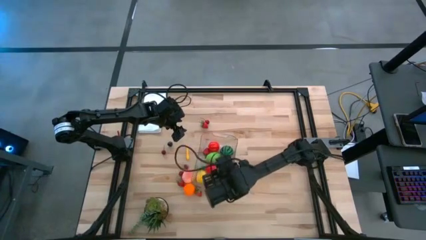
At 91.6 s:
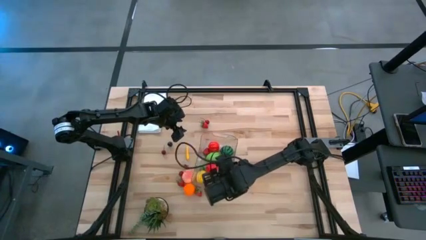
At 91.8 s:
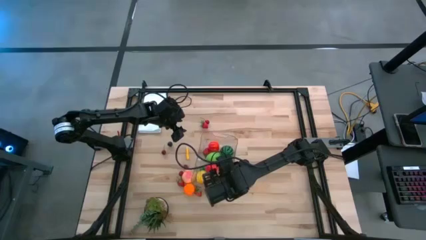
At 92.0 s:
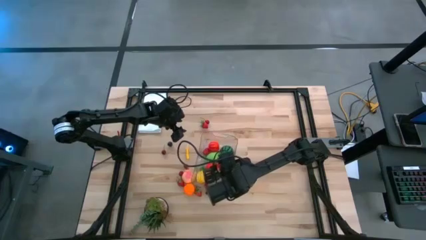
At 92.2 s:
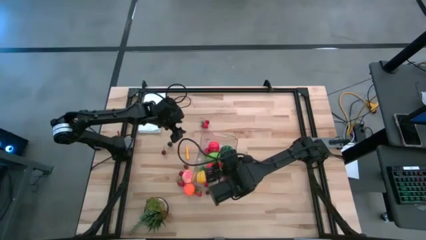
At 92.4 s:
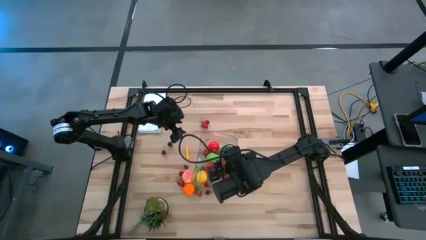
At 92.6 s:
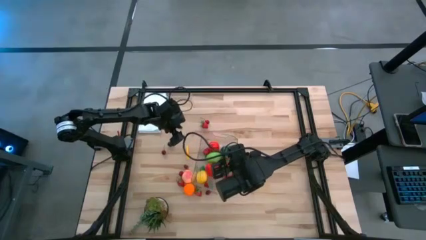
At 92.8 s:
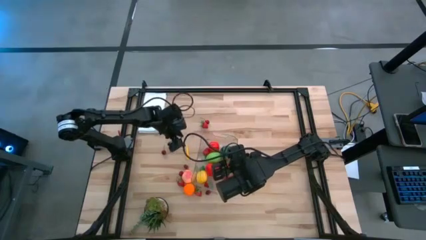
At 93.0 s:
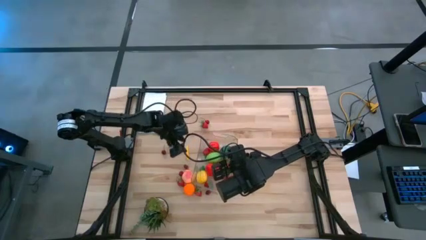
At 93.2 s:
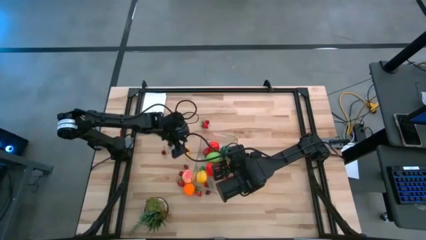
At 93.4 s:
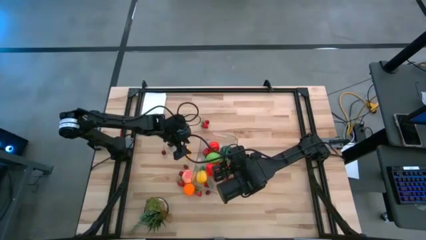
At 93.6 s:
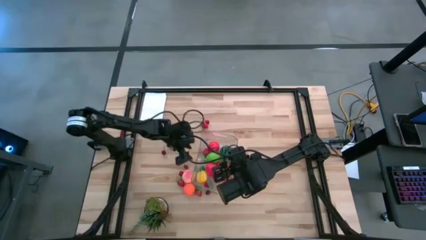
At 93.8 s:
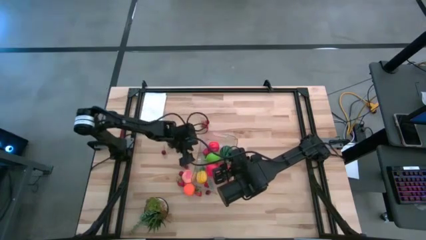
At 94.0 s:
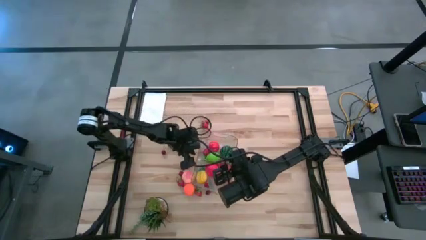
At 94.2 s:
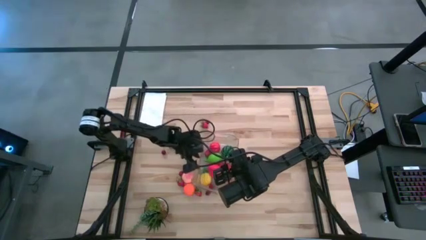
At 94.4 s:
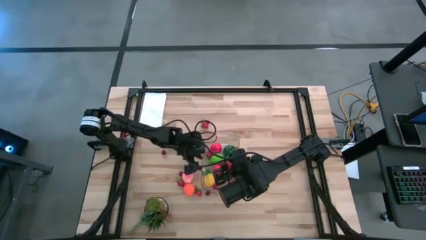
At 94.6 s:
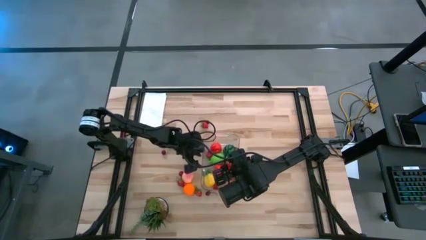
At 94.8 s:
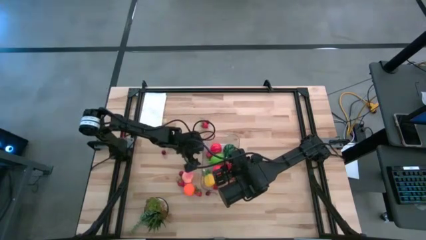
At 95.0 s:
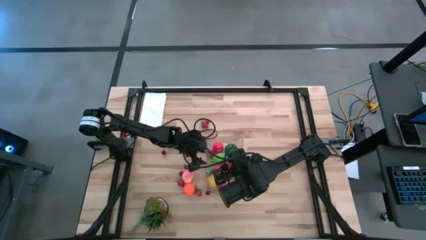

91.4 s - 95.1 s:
Task: Pick and placing Produce into tupperware
Adjust the transparent bin

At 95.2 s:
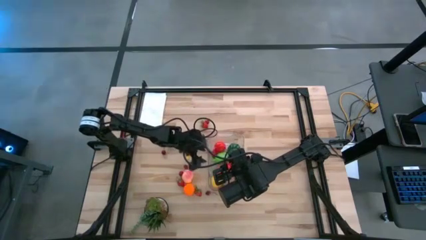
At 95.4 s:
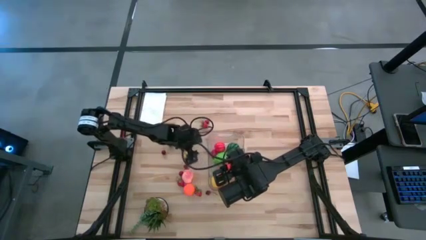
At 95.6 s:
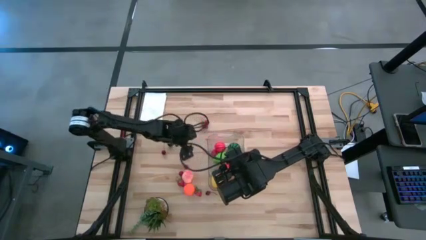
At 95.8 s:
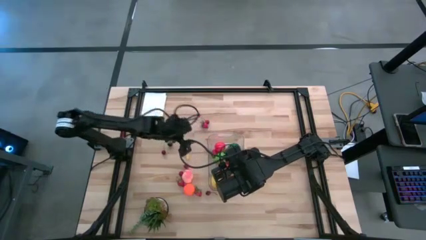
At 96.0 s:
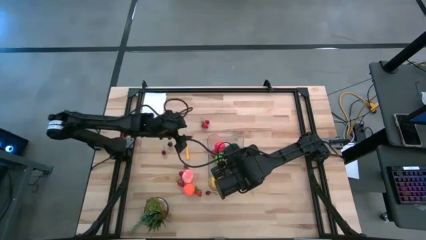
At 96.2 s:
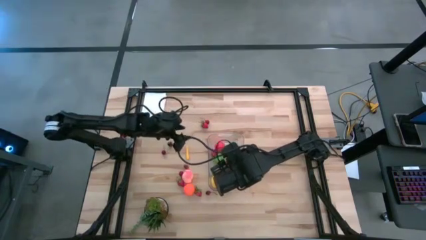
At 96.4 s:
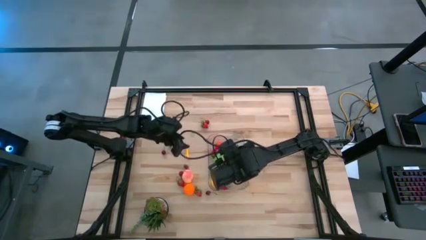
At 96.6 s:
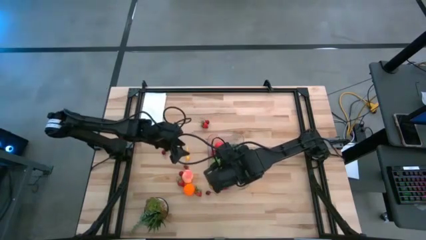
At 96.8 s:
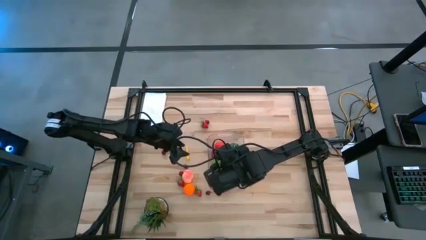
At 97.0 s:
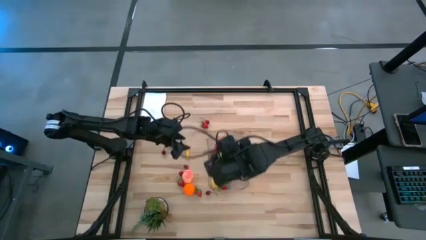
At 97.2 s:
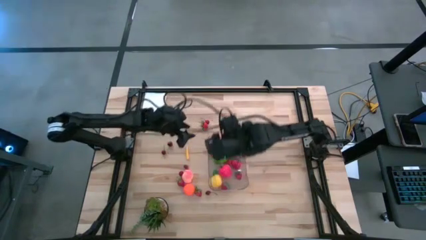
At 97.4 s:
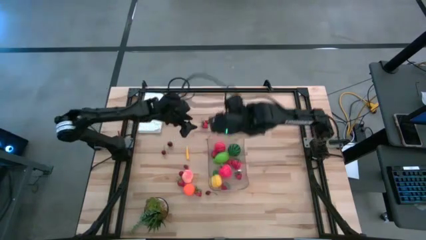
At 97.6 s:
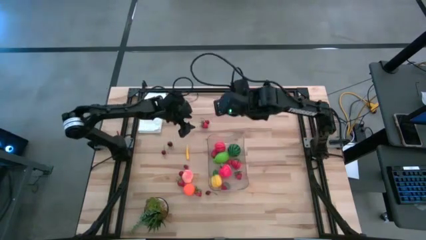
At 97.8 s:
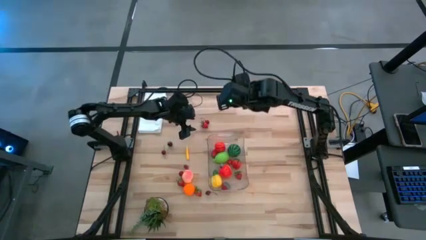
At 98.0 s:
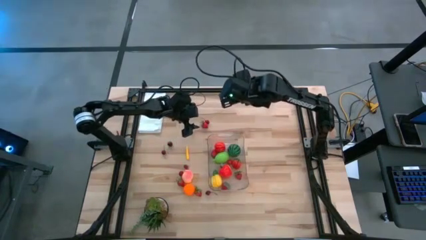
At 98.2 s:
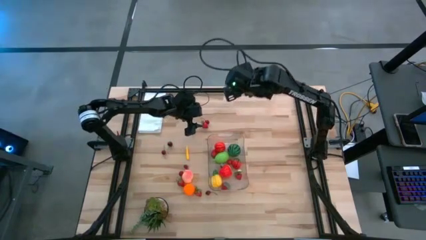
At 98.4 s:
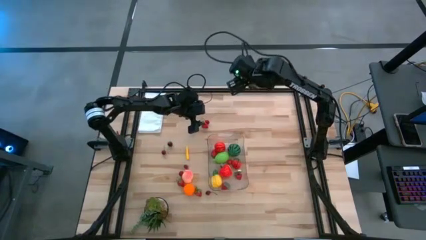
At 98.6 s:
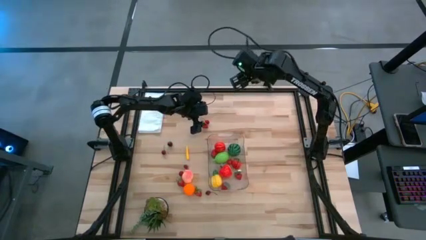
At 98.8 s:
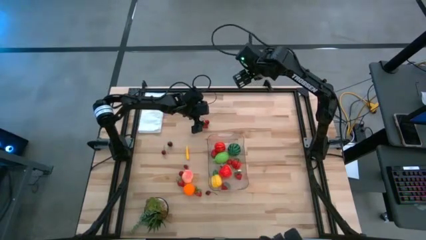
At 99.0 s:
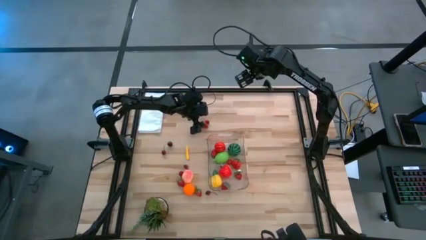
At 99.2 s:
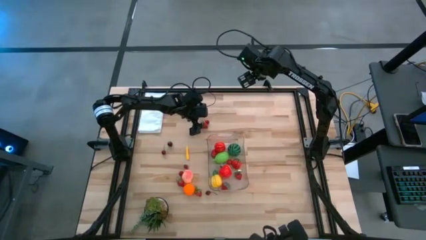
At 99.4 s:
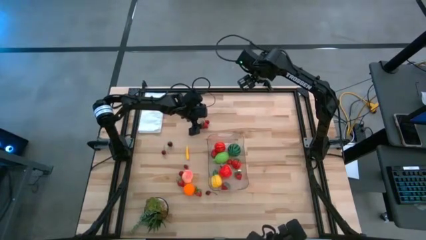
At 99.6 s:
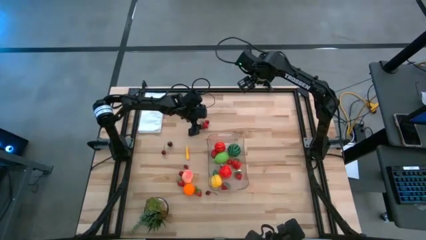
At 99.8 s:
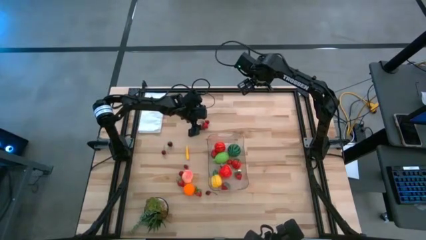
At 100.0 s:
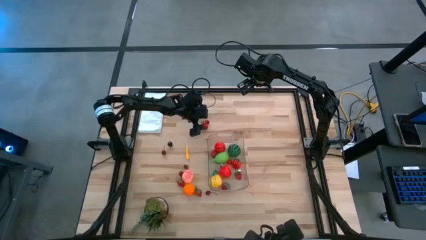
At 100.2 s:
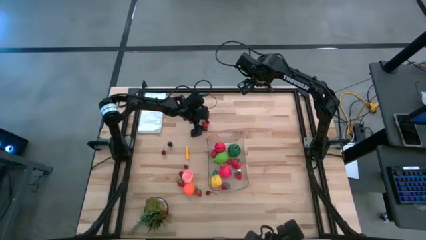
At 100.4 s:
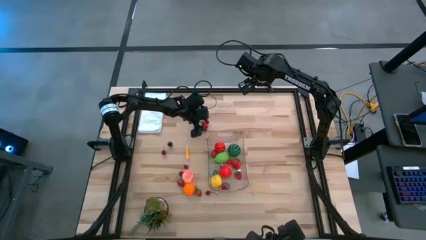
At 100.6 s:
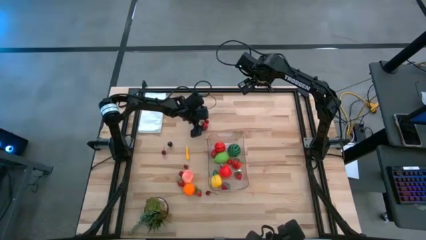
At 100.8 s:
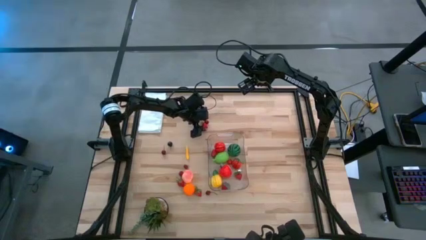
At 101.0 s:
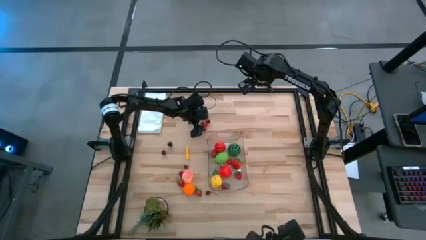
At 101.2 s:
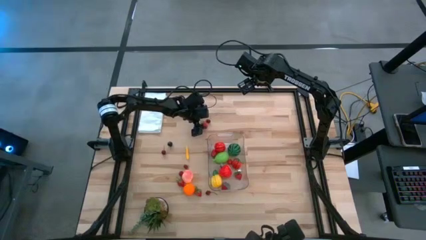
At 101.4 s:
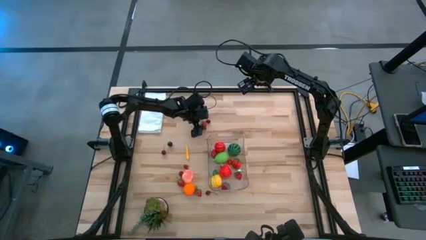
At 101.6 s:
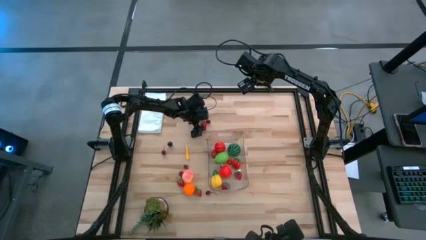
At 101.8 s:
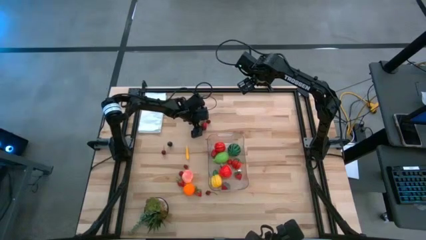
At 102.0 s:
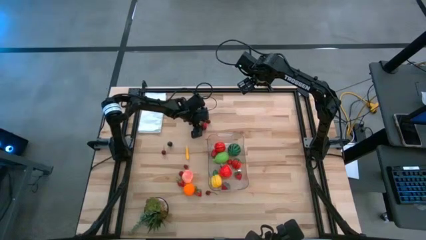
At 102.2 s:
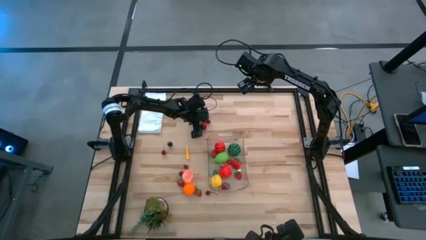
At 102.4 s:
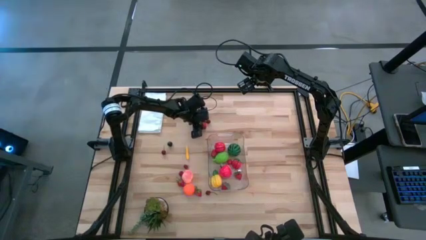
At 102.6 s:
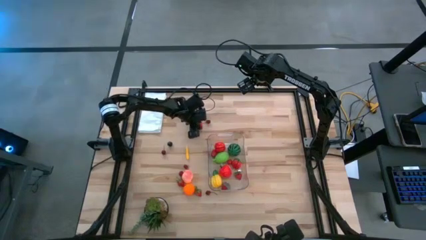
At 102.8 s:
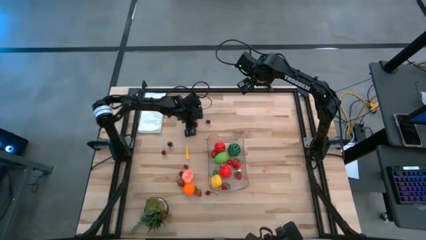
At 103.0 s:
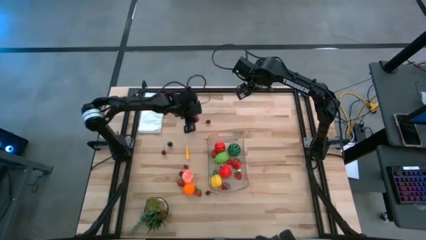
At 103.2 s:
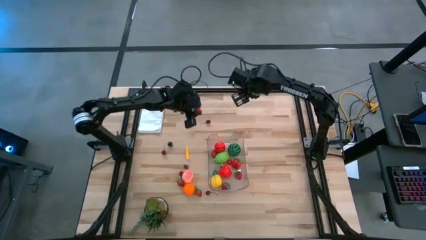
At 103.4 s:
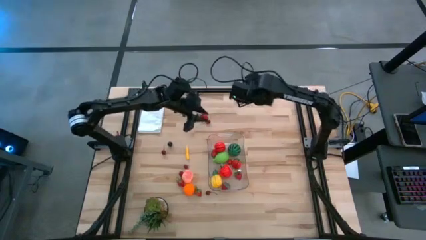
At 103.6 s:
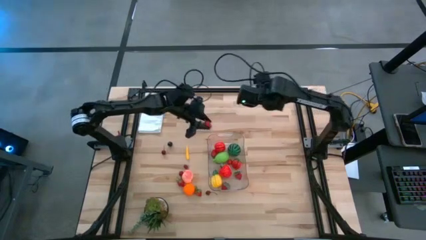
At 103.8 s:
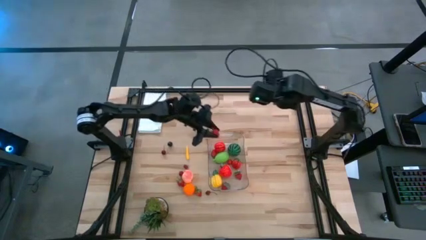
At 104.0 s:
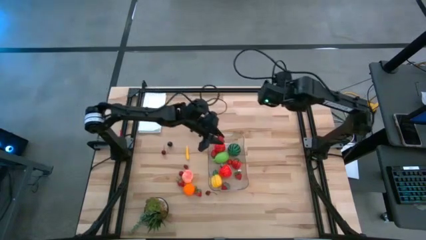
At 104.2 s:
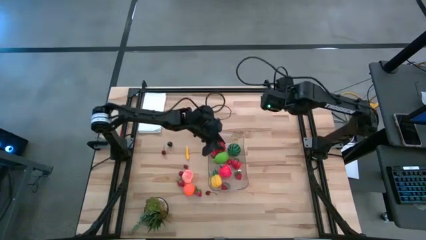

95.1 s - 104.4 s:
Put the strawberry into the transparent bin
